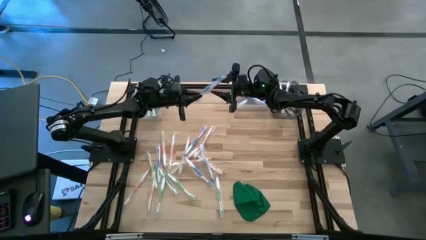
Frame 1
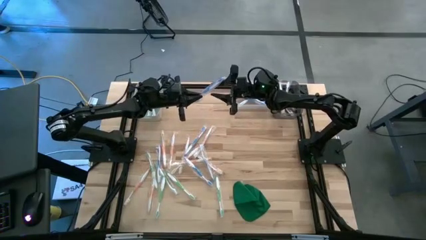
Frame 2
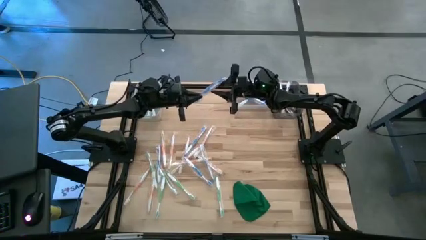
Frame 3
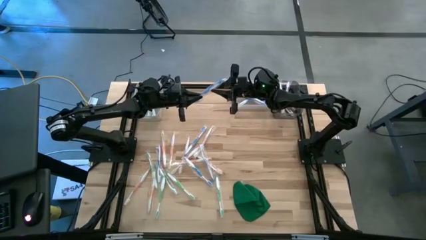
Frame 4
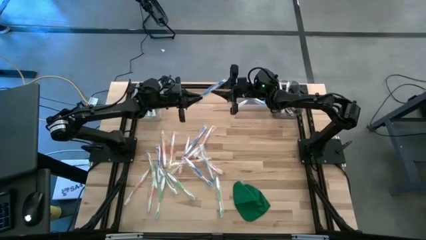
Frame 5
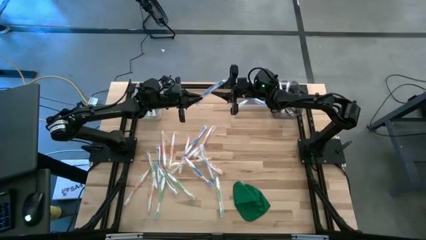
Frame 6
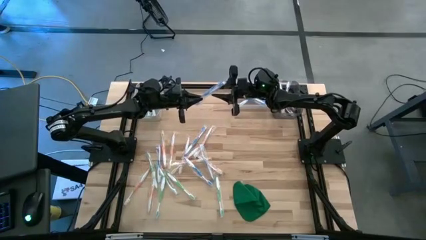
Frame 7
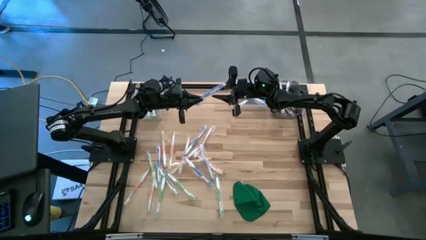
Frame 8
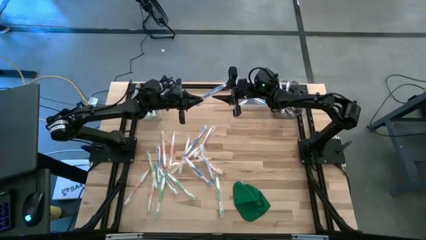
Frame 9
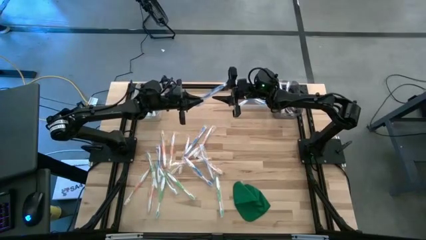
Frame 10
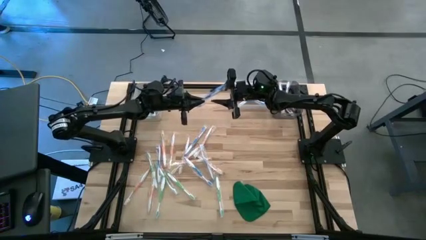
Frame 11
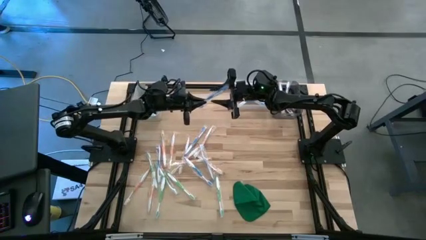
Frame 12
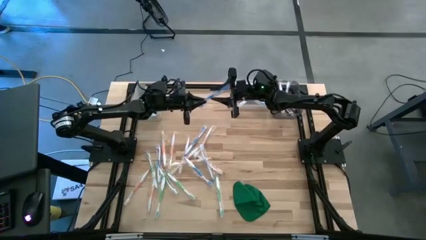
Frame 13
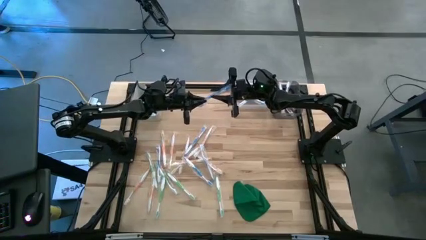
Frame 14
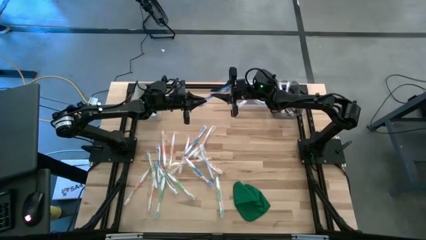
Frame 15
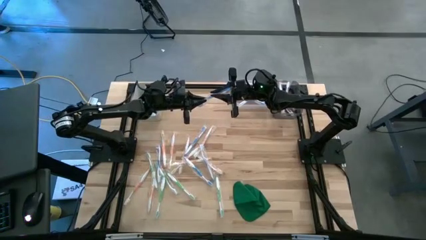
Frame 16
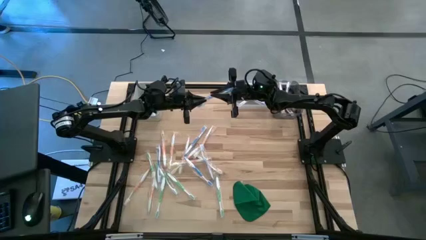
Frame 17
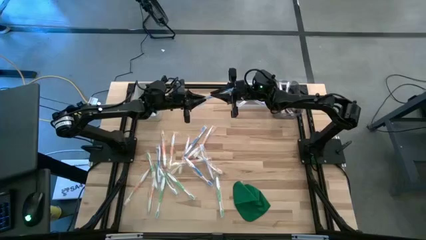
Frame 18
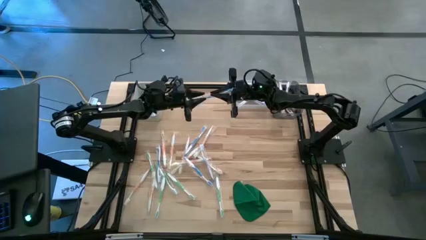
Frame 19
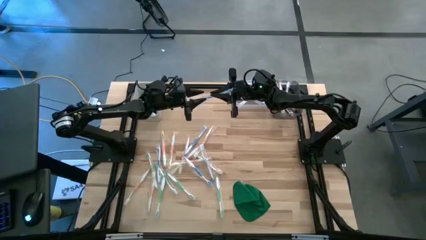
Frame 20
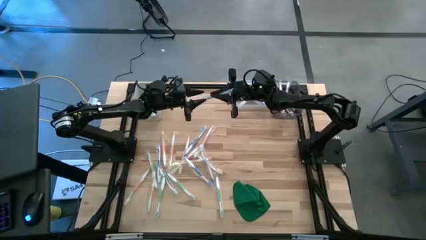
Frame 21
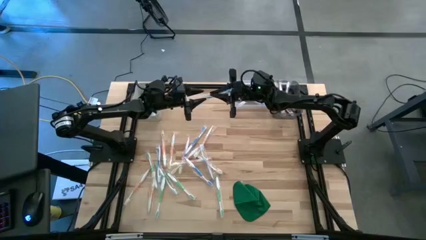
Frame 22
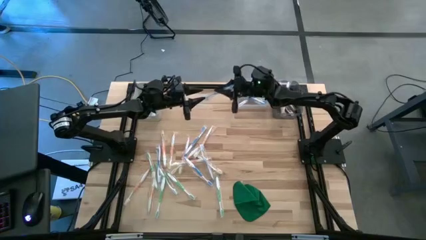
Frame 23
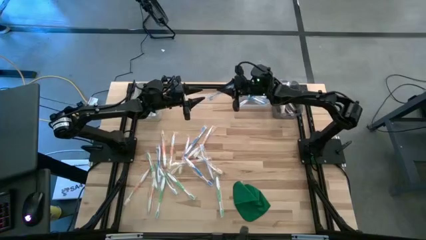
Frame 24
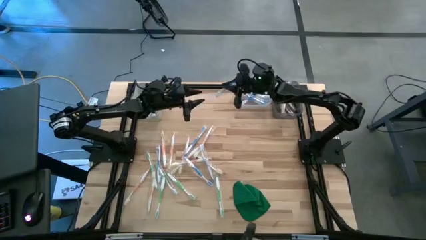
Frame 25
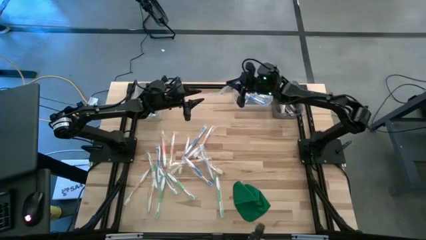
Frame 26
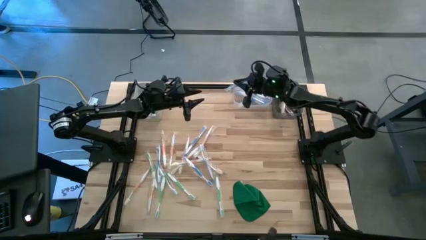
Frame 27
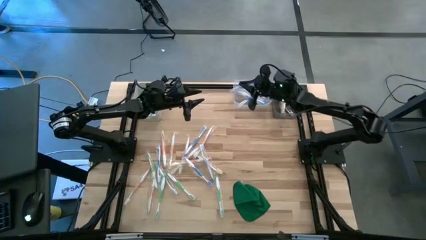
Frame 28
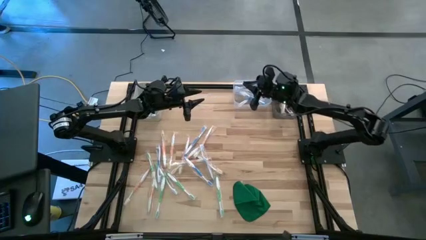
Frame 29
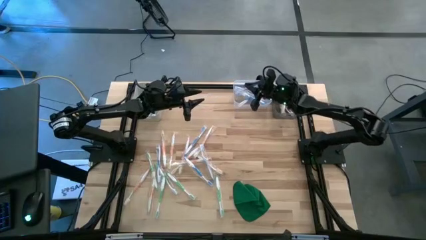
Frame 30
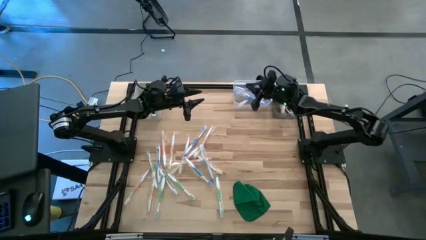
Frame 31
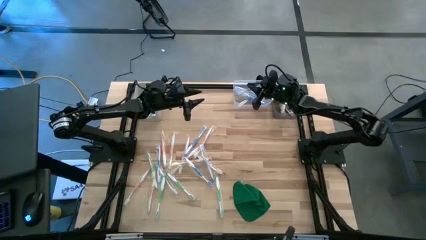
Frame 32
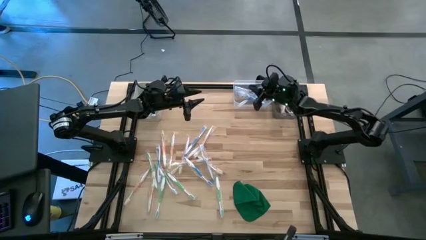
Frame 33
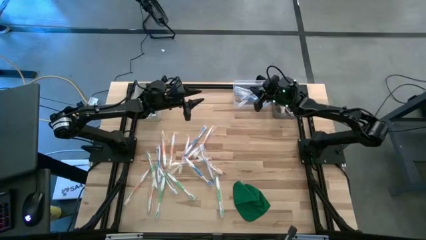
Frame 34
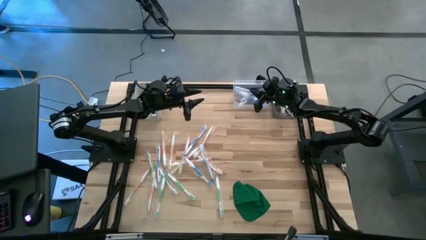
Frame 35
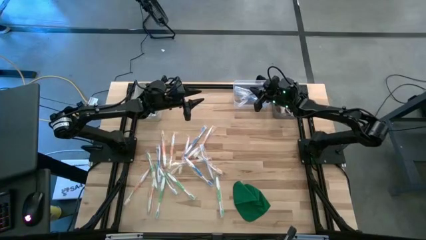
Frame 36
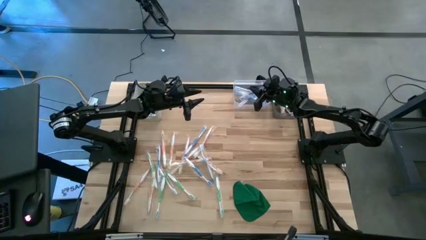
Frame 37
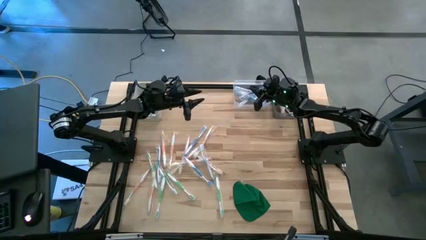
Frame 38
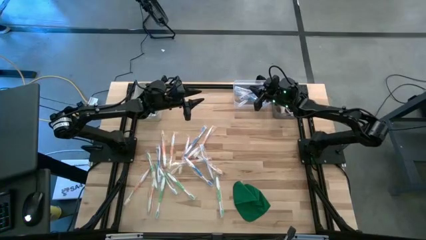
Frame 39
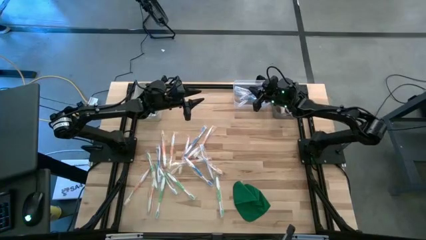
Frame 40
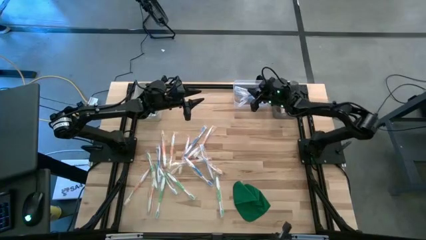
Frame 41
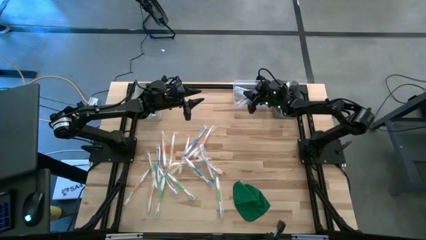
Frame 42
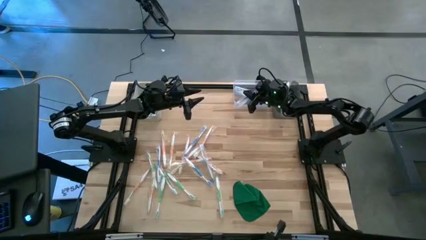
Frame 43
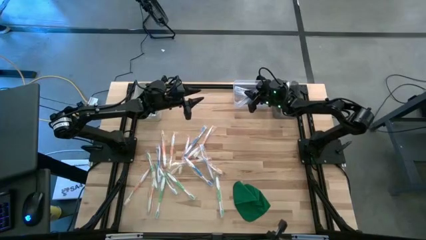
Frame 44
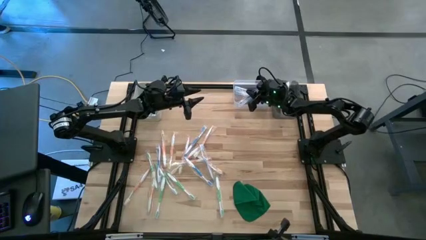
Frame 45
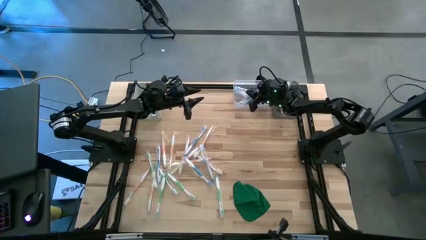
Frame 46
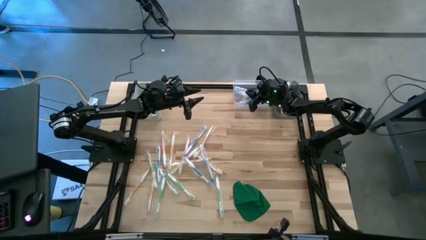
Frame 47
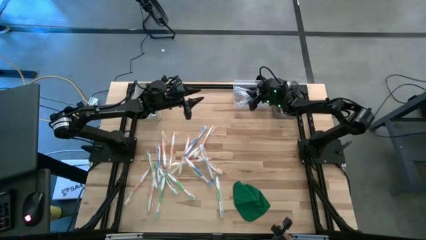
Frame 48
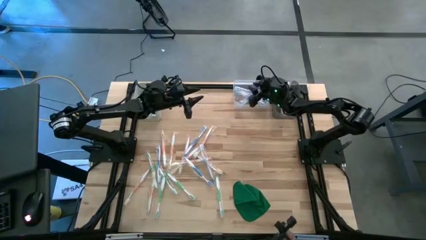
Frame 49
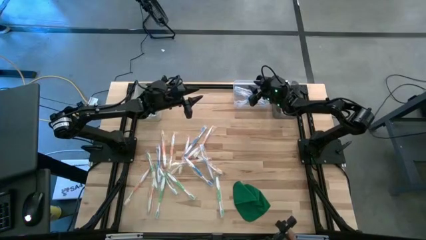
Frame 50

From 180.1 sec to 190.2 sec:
Task: Pick & Place Toothbrushes
Put the blue toothbrush into the transparent bin
